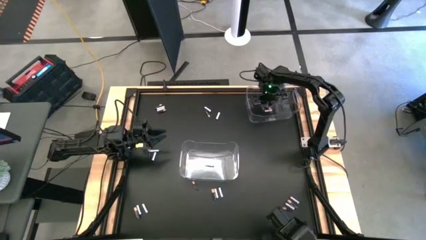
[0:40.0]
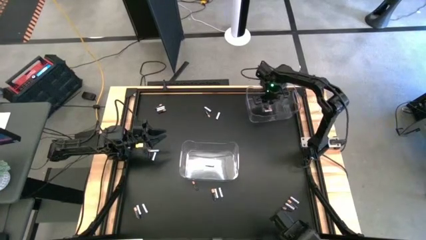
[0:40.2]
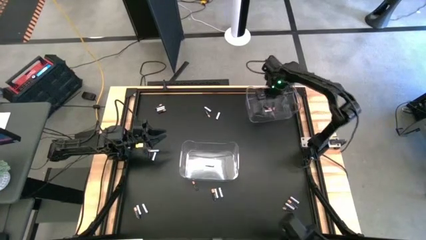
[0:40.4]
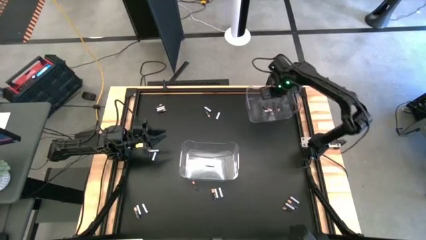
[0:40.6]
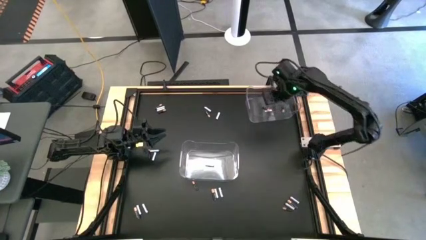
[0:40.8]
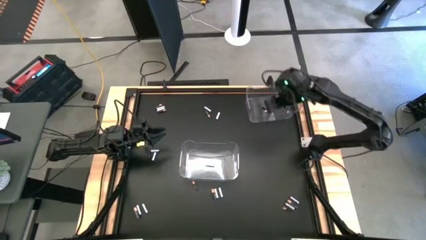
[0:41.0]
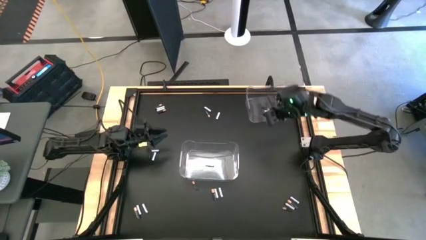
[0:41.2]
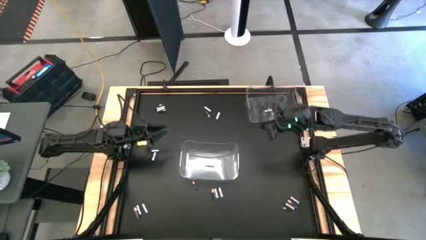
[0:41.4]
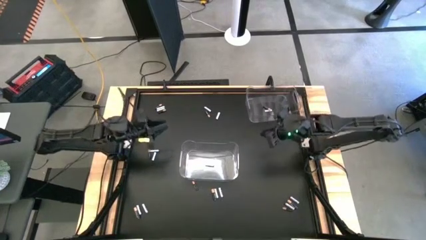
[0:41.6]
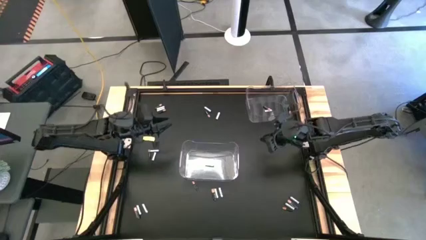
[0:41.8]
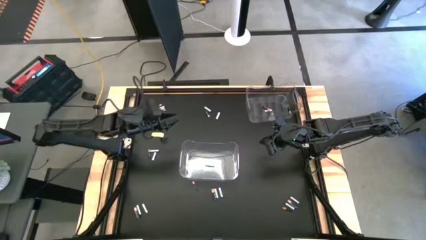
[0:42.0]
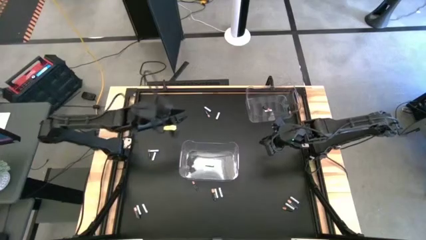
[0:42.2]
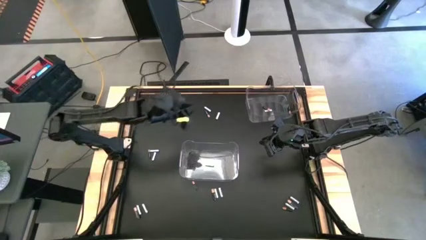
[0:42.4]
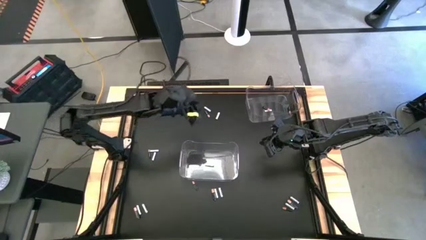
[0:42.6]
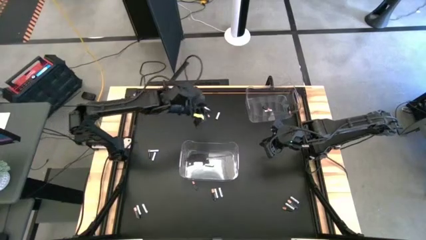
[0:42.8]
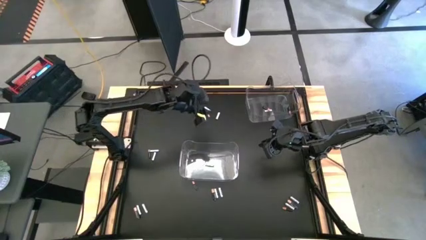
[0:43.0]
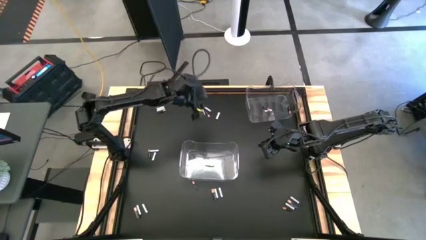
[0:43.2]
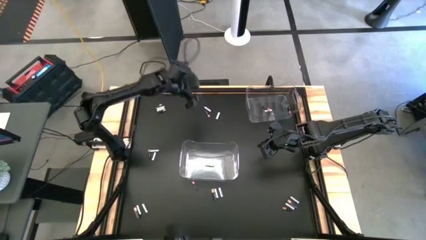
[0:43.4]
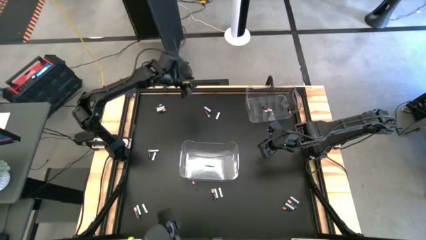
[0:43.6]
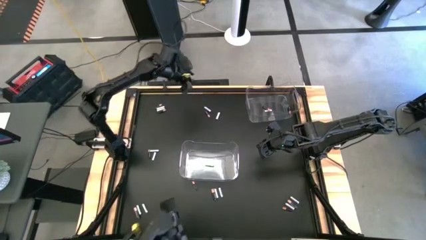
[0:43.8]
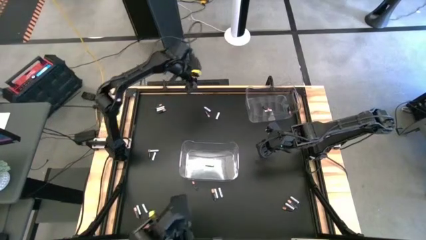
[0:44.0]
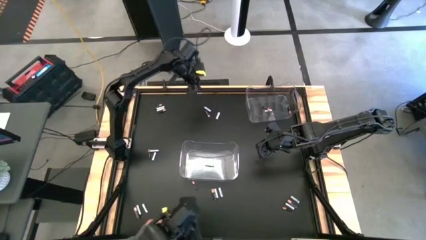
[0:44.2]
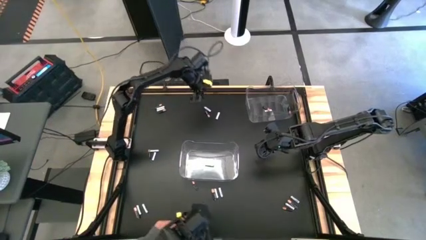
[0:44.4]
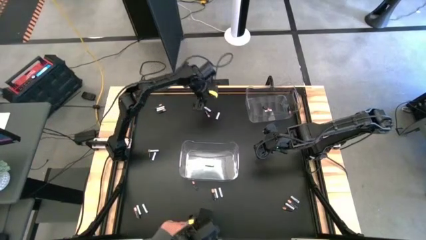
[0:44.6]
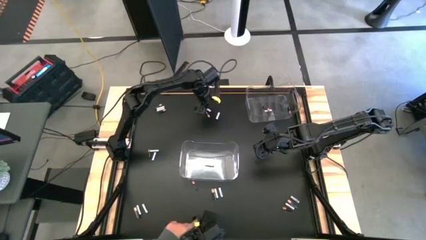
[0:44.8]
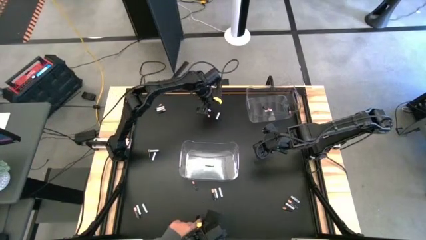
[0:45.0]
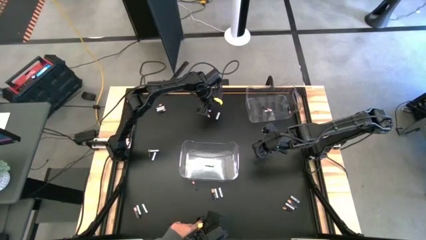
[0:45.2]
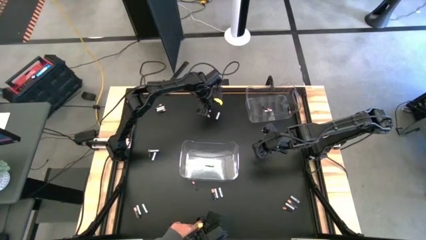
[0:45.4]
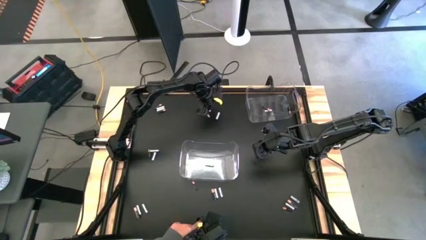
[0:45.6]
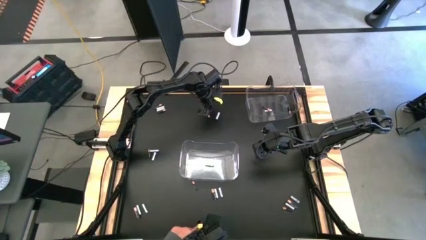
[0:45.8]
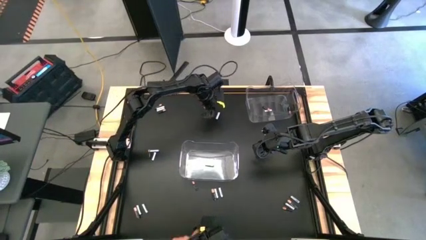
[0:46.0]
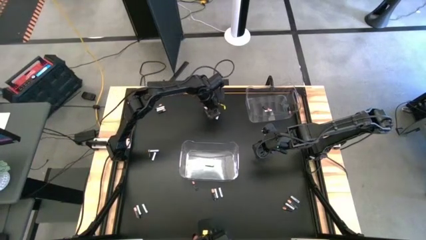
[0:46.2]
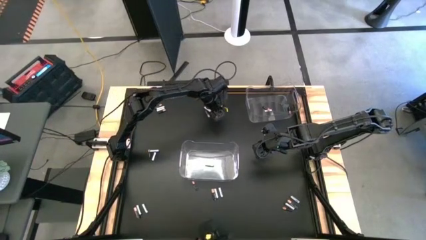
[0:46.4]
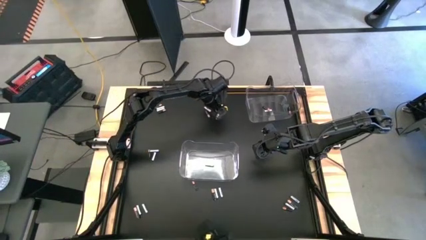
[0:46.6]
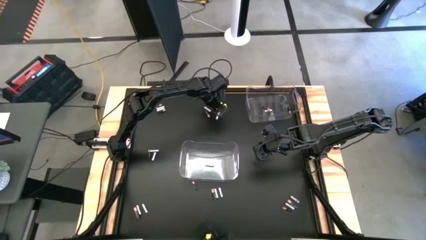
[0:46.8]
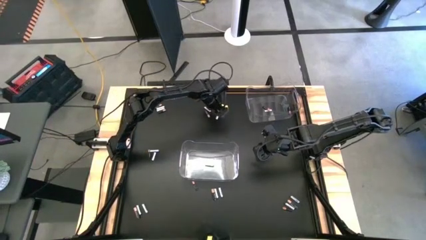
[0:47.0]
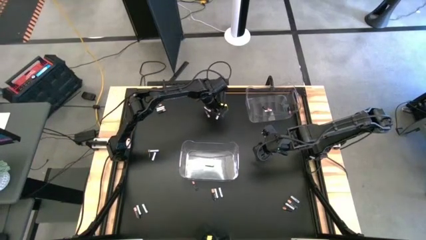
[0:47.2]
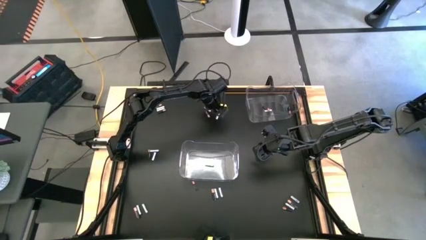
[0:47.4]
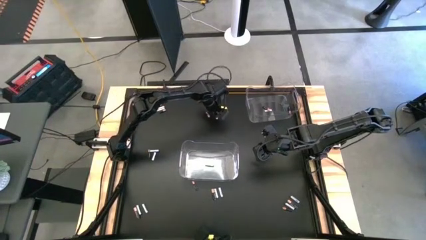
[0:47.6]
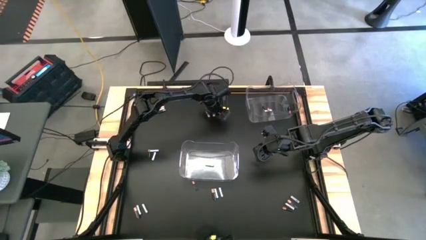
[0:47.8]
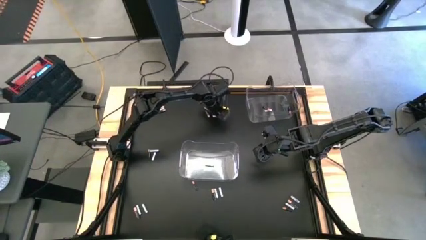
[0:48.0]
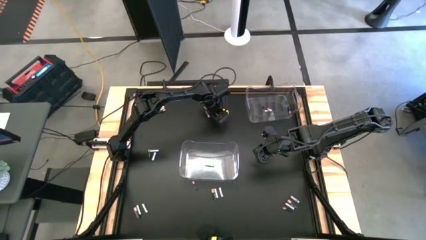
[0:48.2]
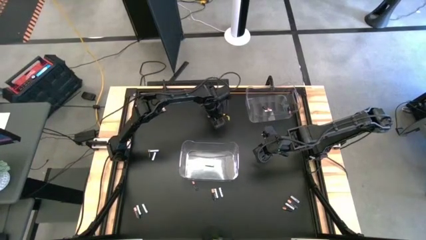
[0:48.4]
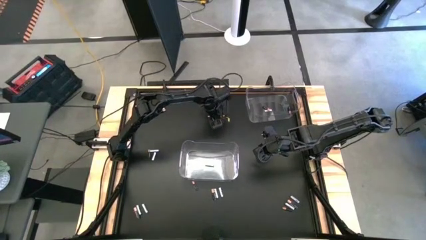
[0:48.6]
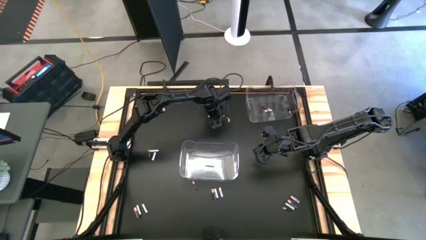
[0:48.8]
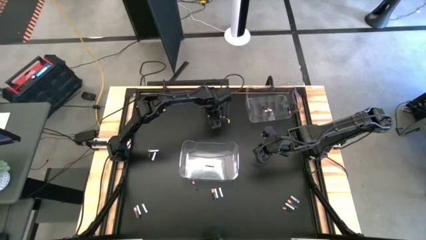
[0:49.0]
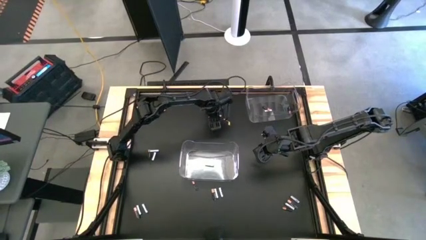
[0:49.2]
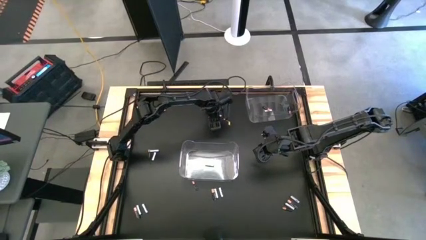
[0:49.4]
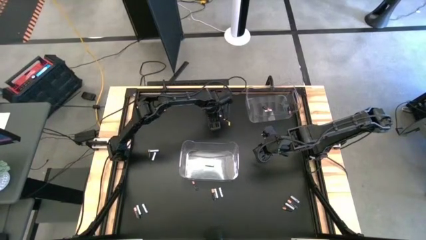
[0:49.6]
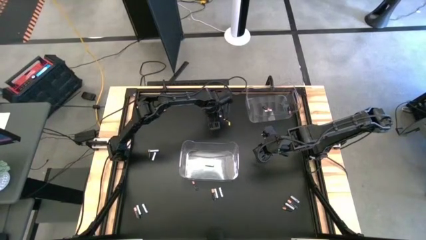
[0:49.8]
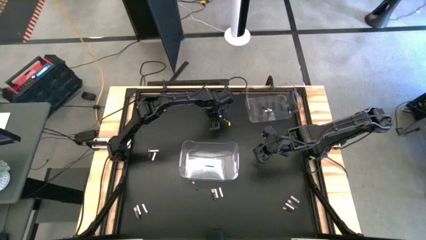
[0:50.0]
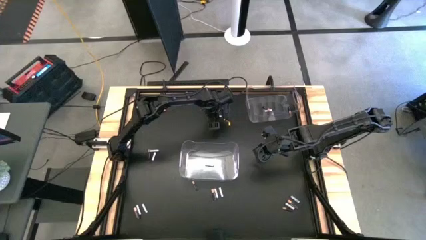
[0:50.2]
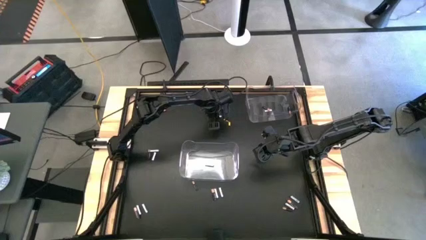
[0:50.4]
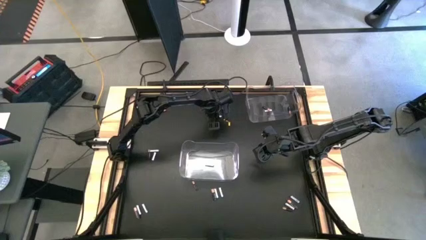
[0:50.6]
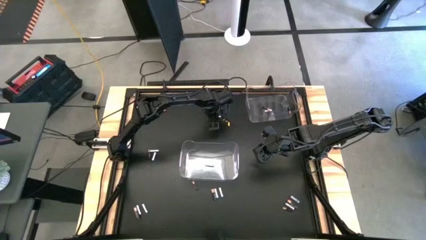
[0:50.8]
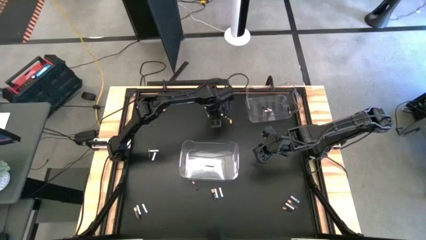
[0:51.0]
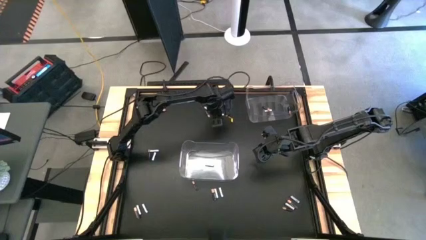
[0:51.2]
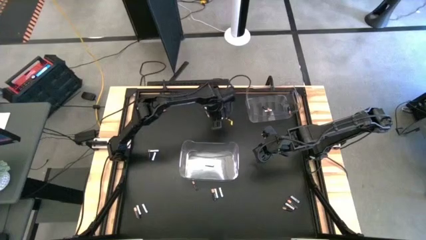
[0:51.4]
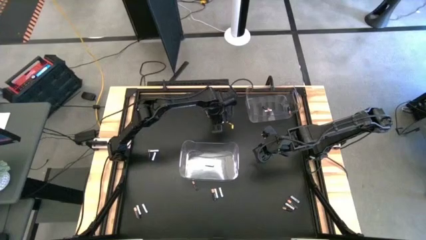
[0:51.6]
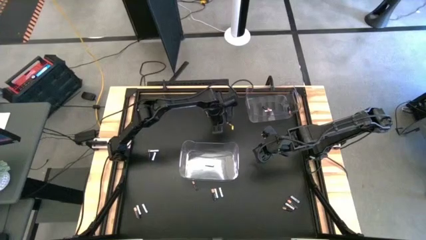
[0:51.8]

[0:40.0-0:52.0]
Task: Sort batteries
Put the white battery into the left transparent bin

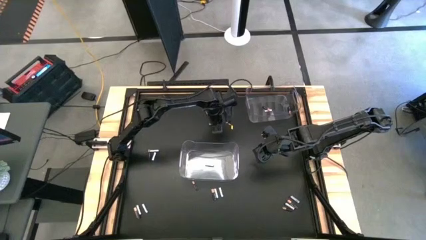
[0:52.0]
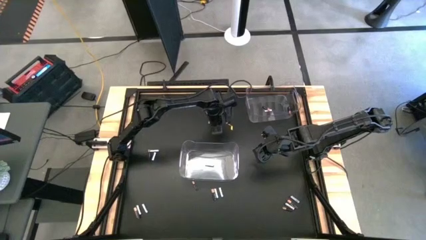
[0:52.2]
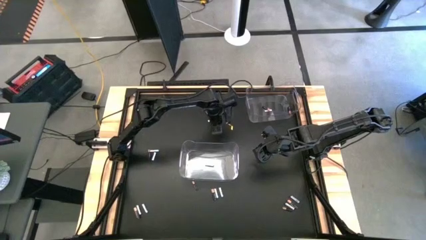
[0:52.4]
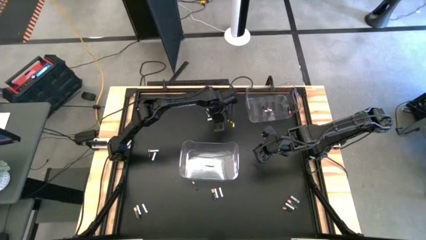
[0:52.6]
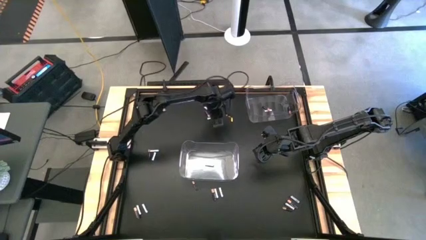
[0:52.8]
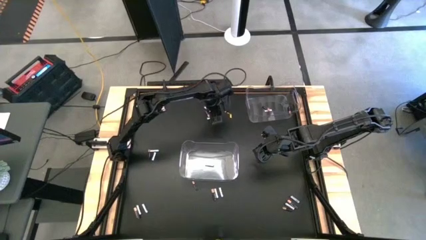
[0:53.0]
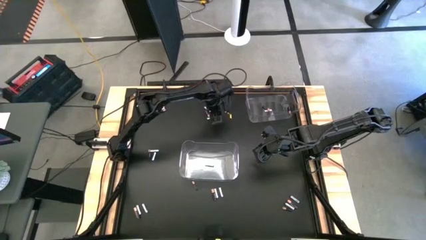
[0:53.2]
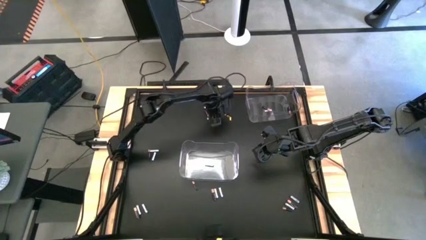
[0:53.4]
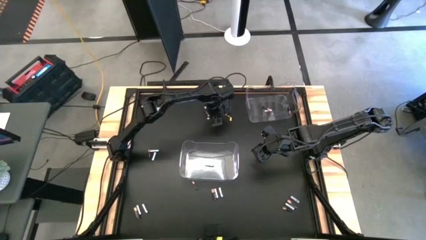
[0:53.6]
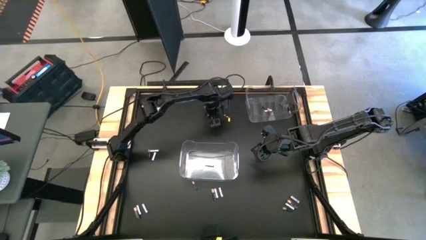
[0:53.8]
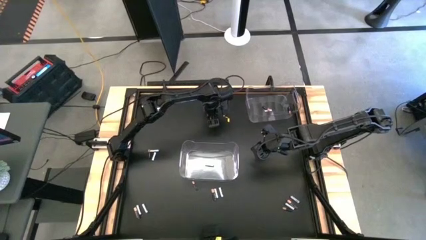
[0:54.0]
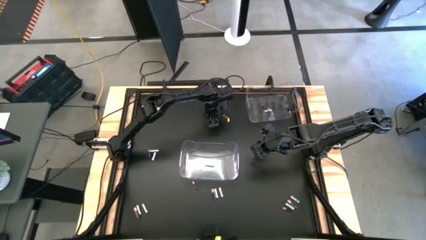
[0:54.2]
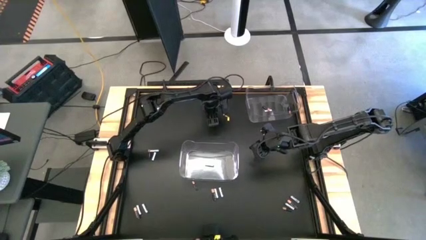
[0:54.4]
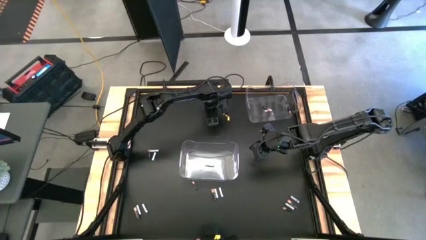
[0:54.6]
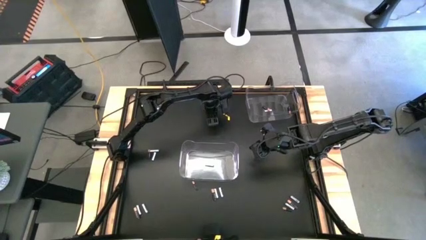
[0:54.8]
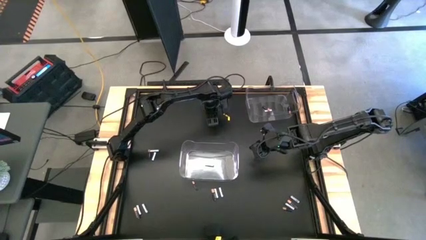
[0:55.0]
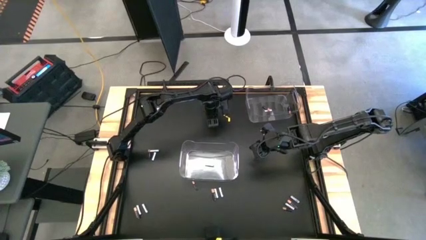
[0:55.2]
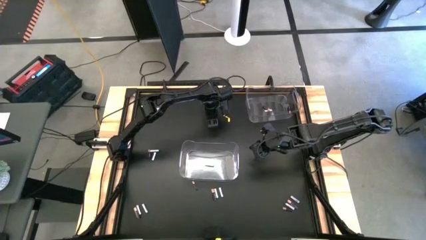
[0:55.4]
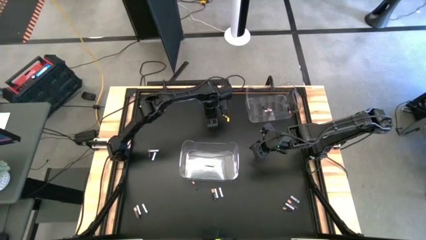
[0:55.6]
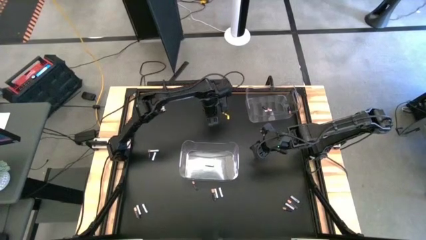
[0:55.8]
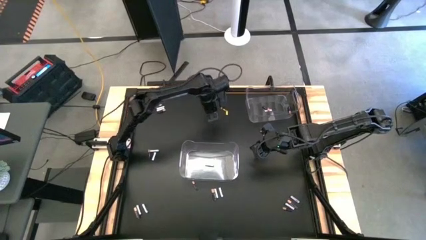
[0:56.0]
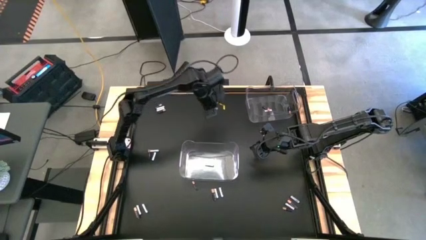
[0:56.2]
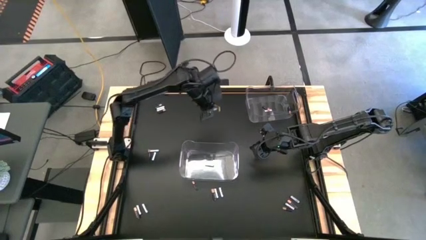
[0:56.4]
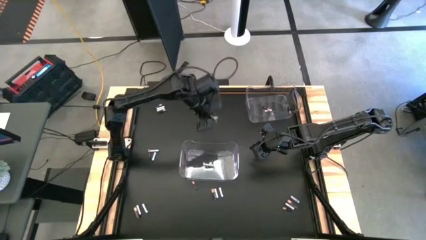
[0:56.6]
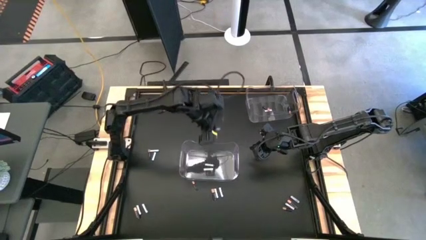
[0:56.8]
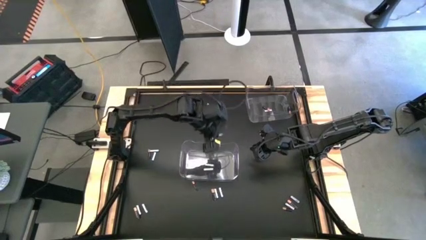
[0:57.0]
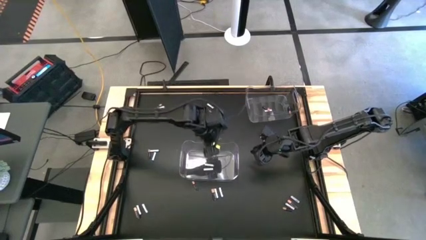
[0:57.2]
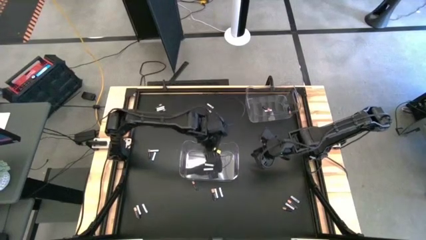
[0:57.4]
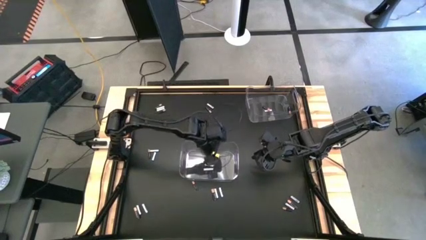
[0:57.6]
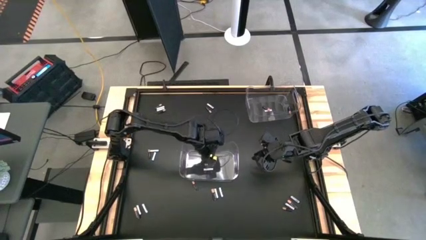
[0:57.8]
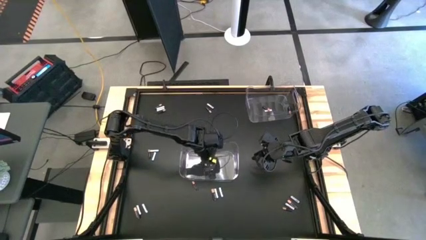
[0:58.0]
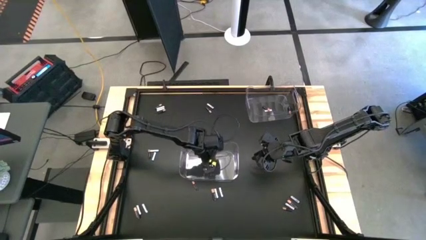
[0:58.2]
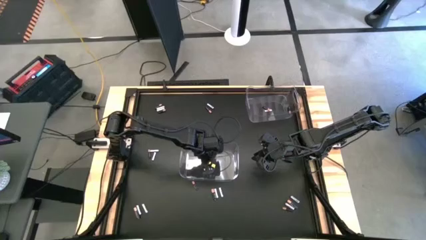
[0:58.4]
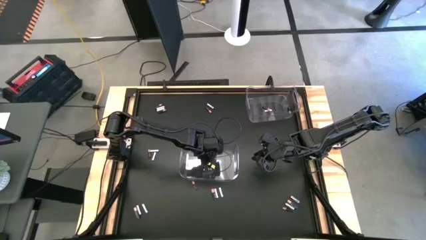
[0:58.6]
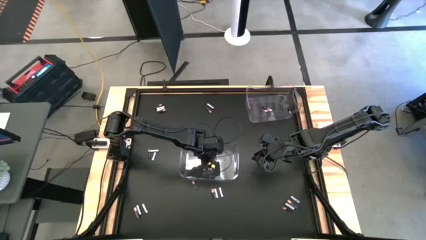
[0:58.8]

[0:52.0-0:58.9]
Put the white battery into the bottom transparent bin
